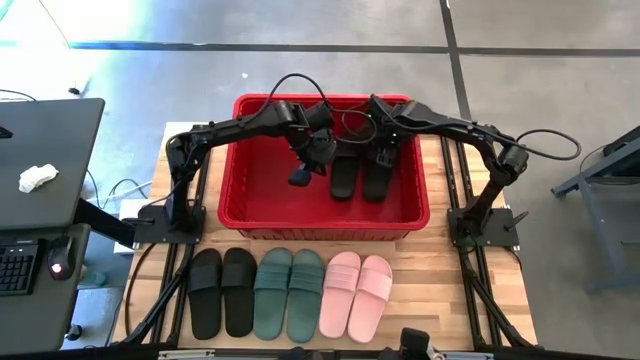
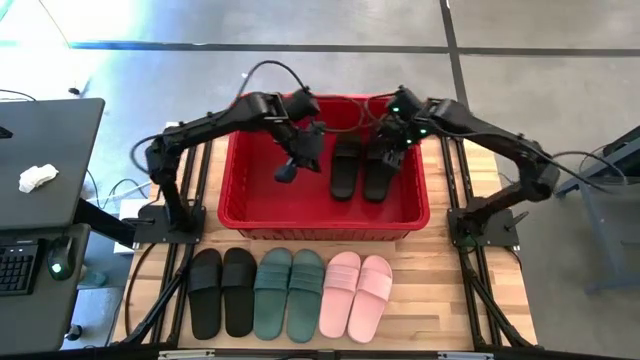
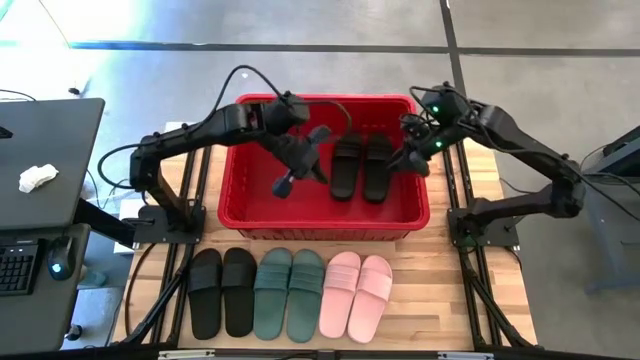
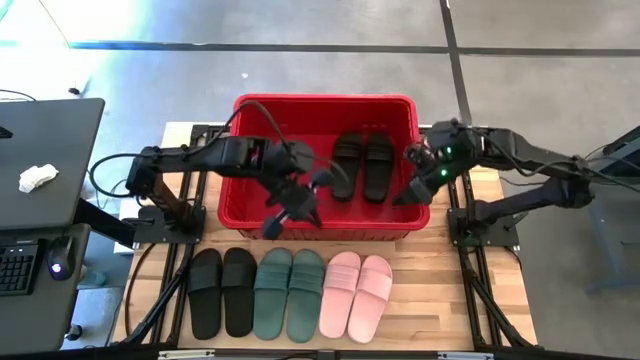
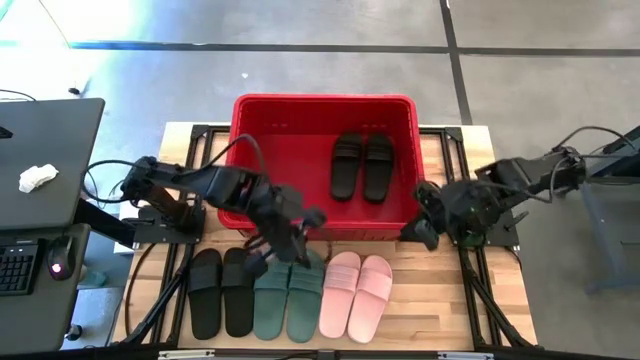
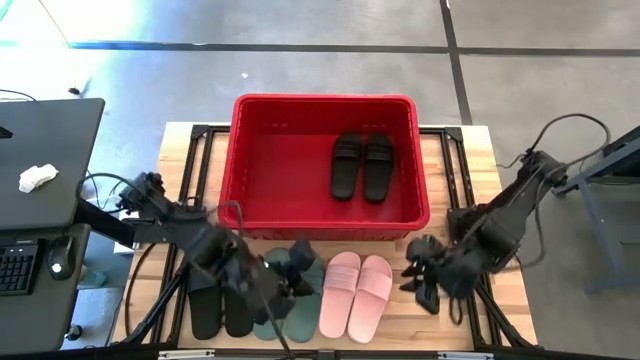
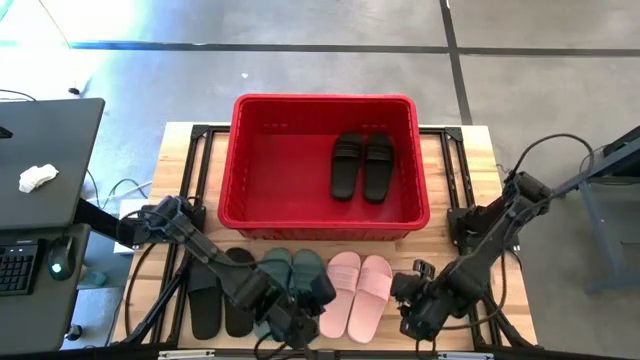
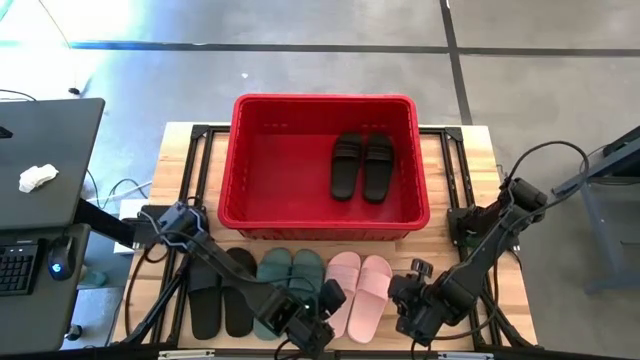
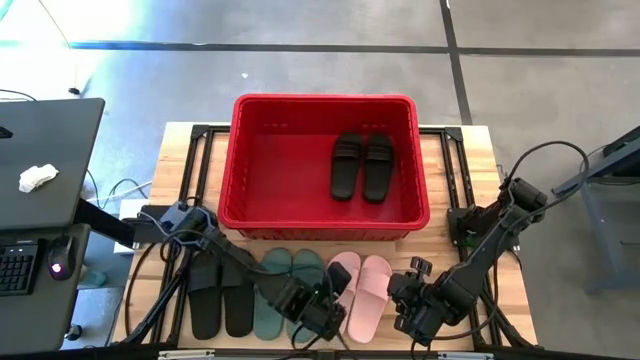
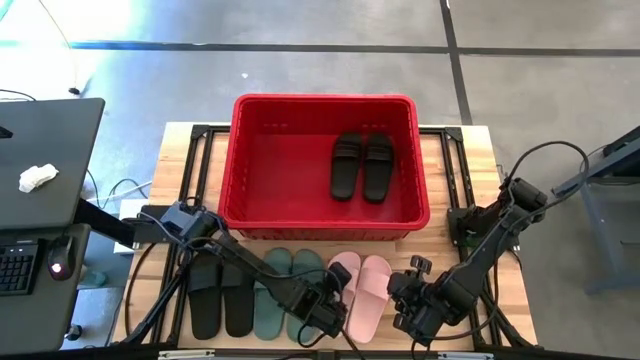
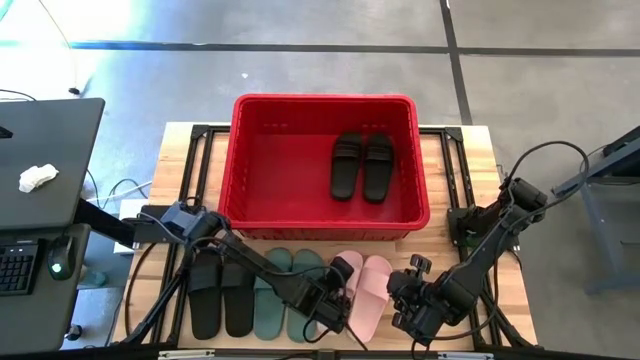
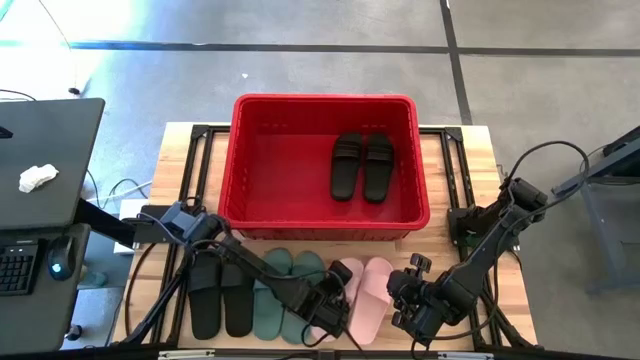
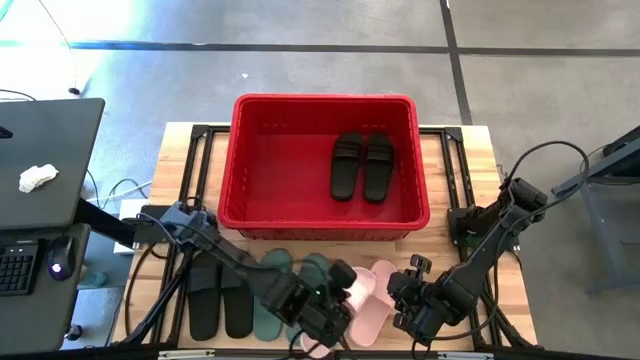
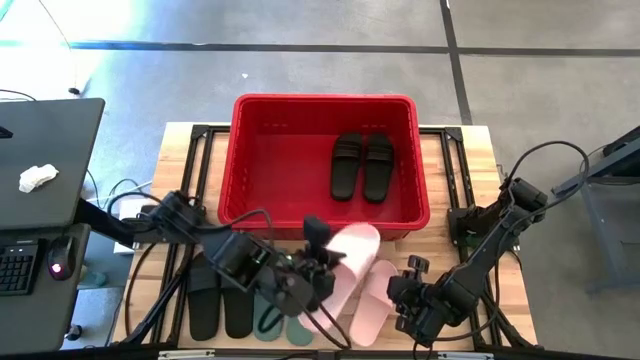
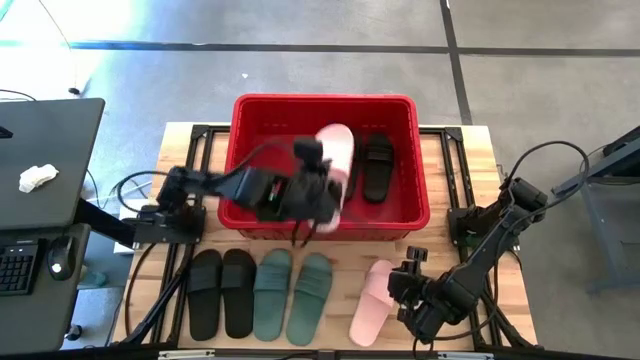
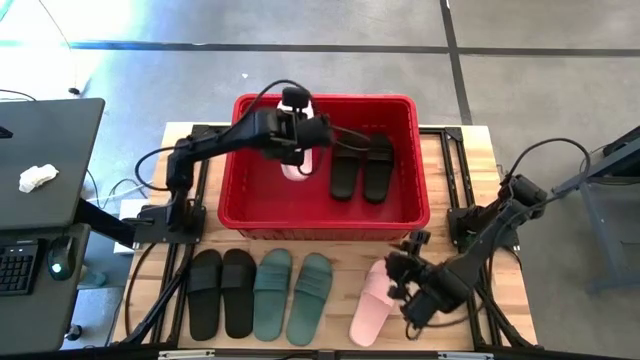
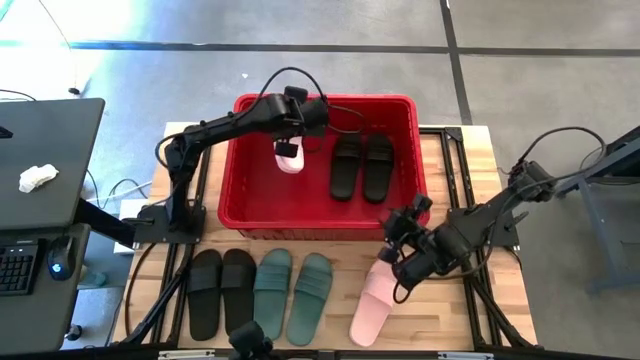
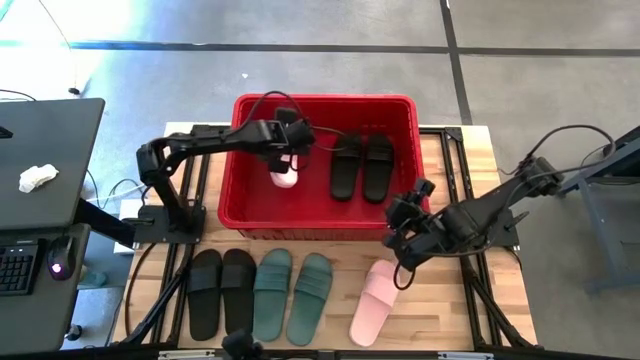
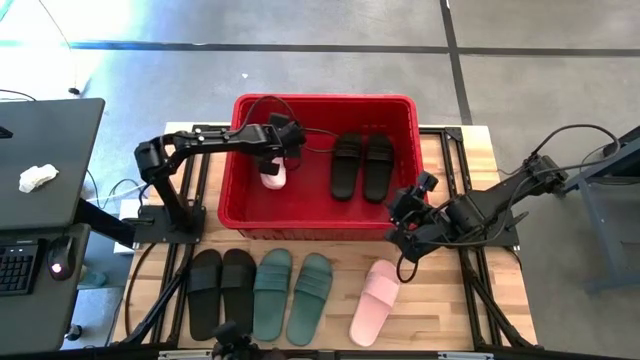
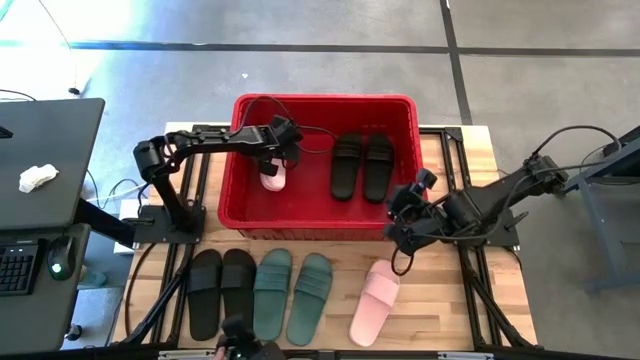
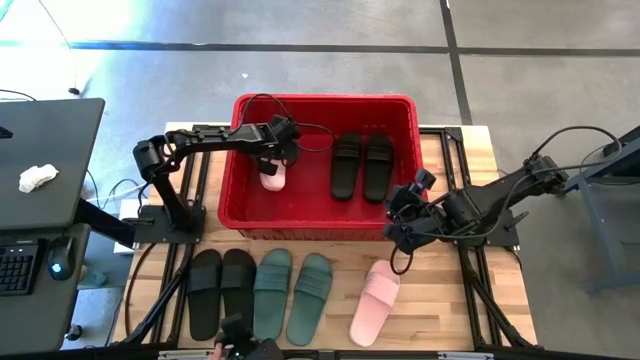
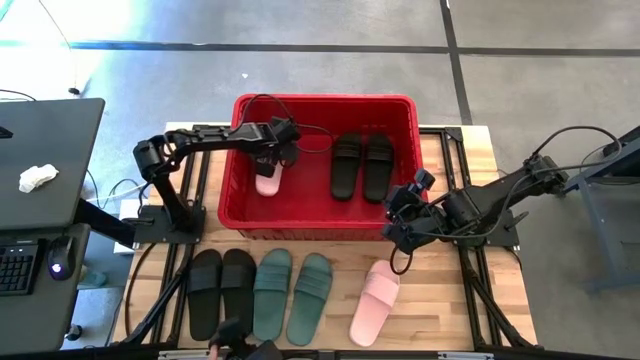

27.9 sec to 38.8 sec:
Task: Pick and place slides into bin
Put the pink slide into the red bin

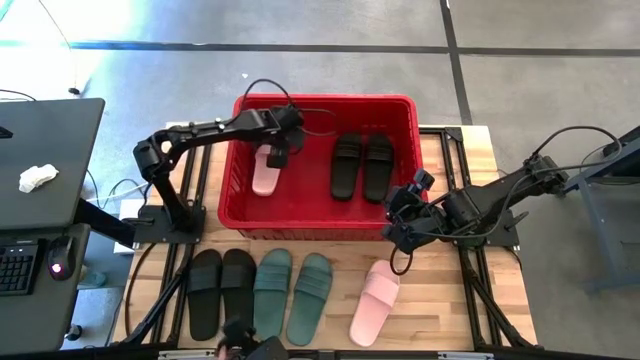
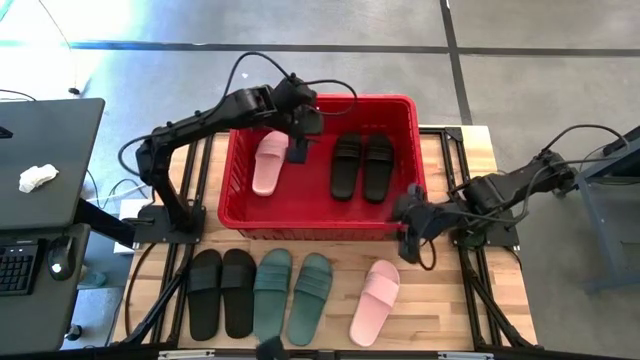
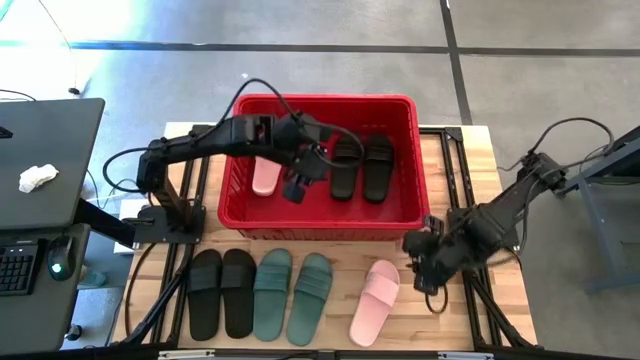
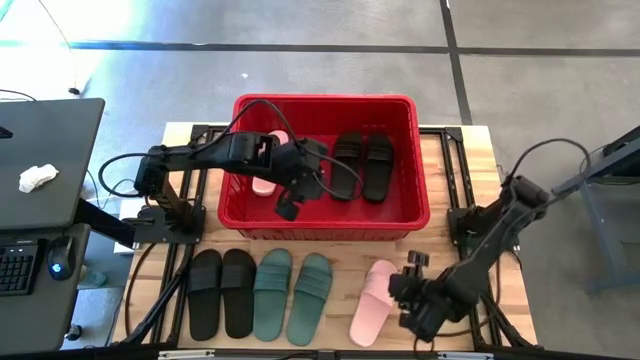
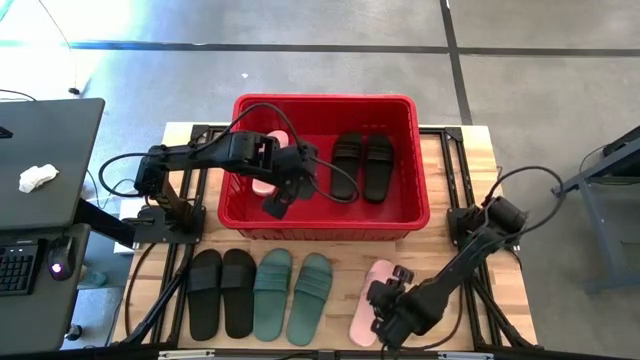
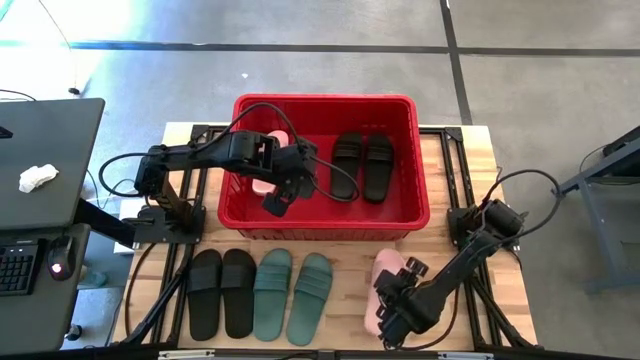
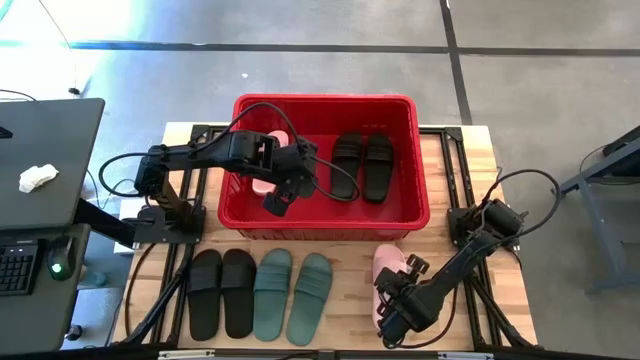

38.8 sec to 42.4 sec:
Put the pink slide into the red bin

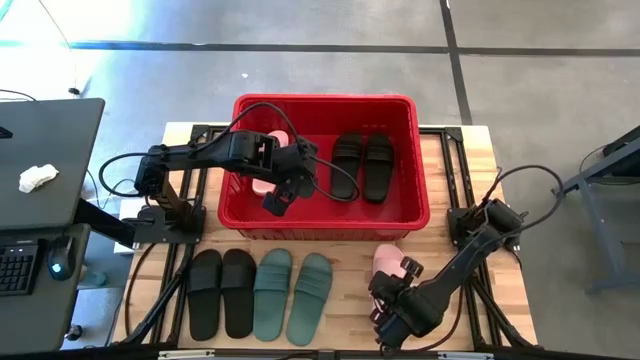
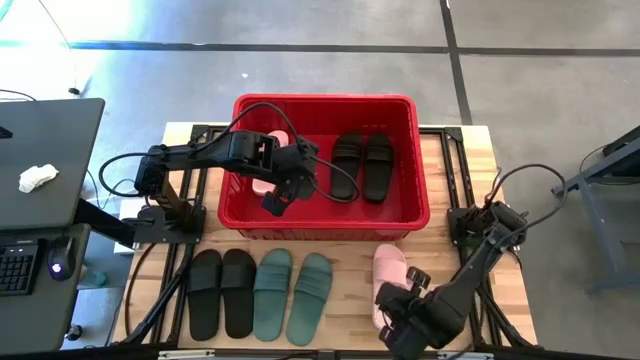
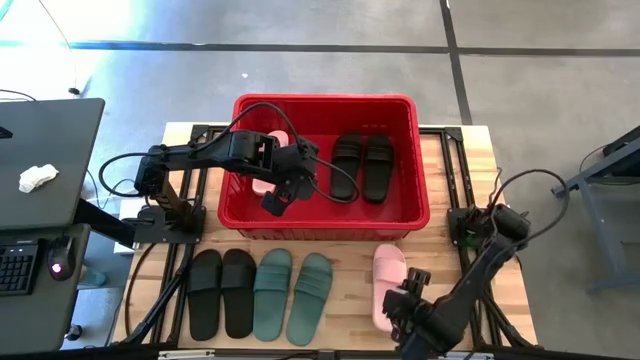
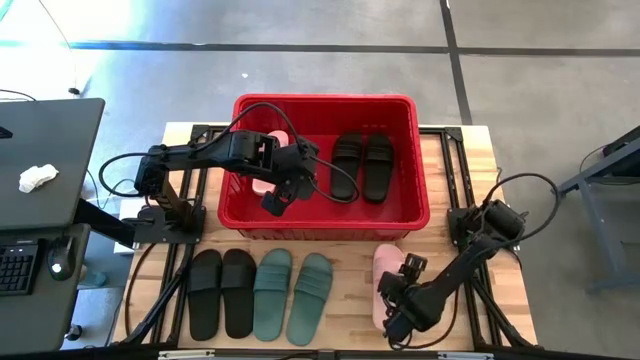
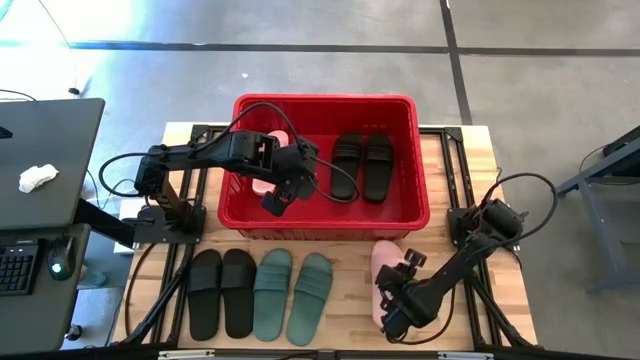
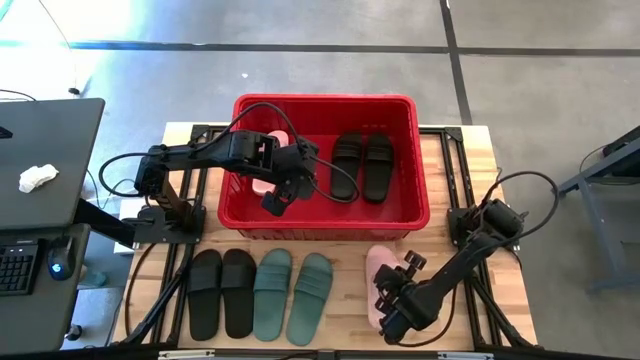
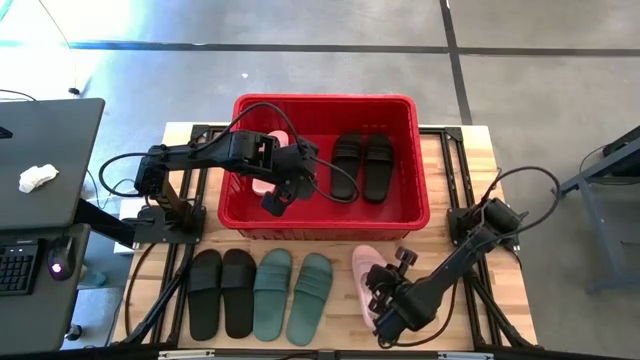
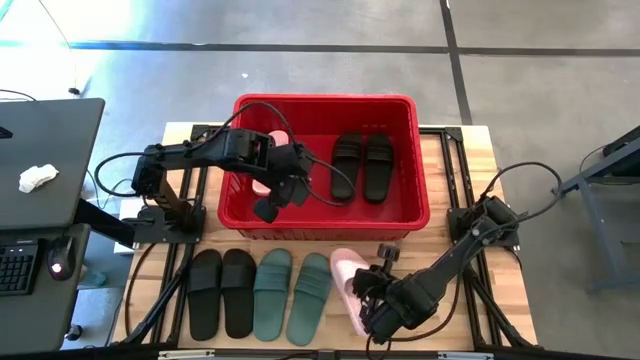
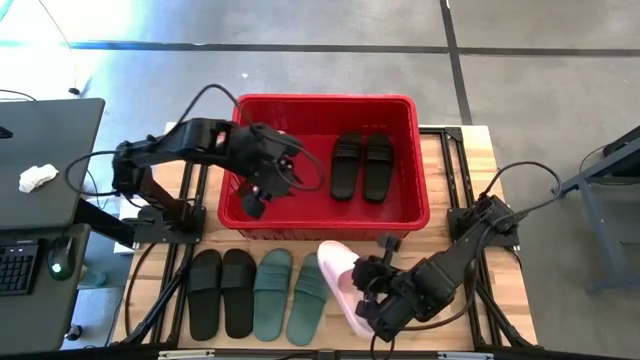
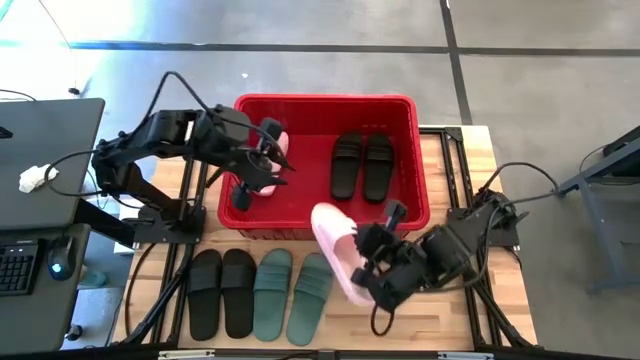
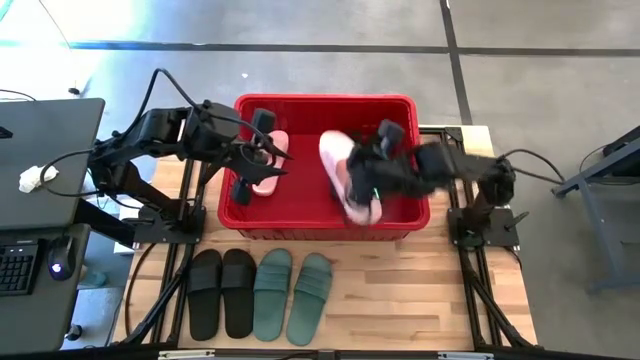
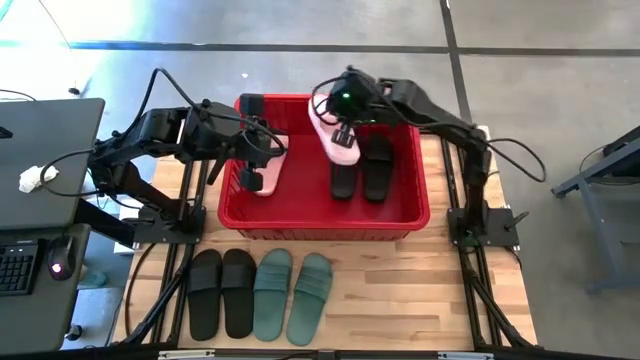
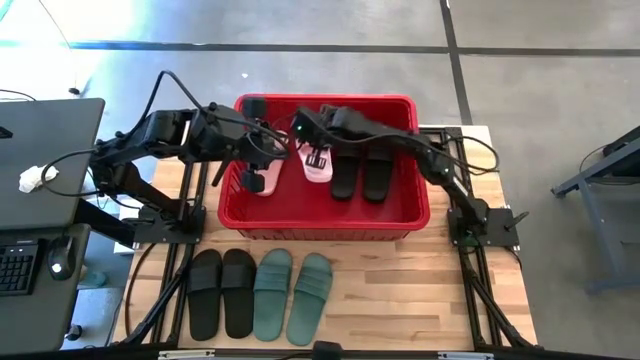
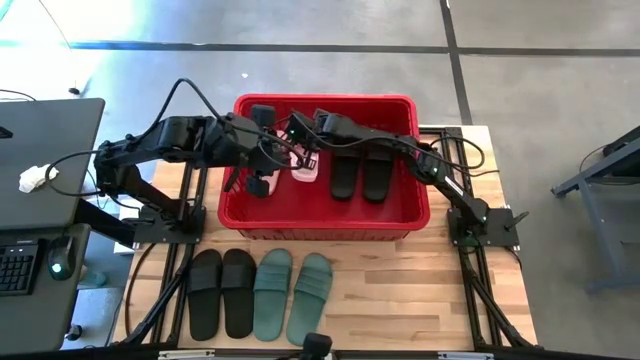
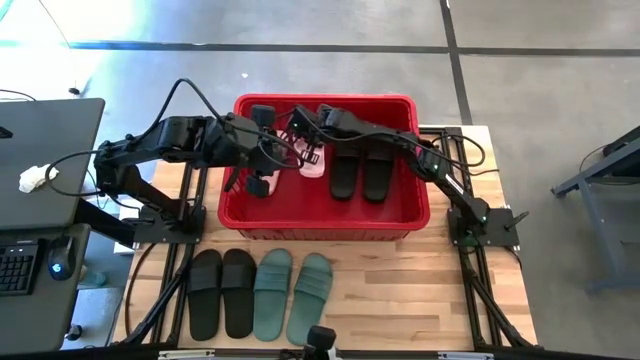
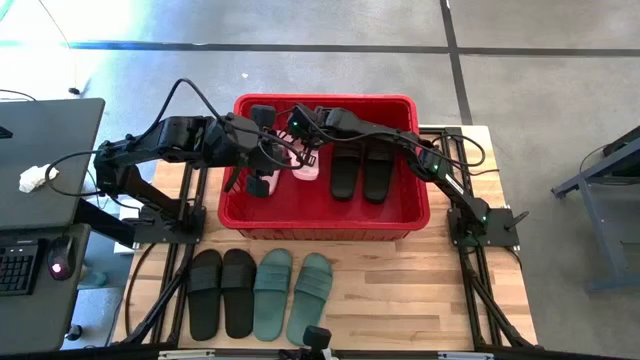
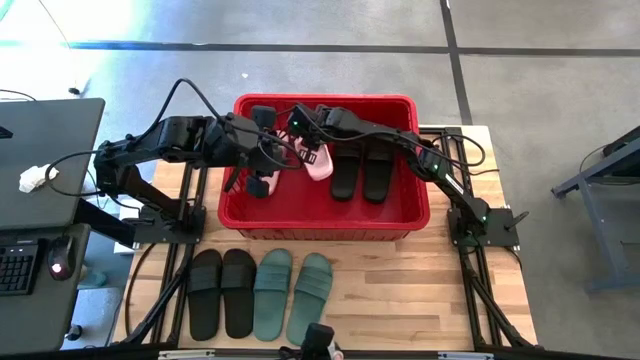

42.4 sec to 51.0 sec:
Put the pink slide into the red bin
